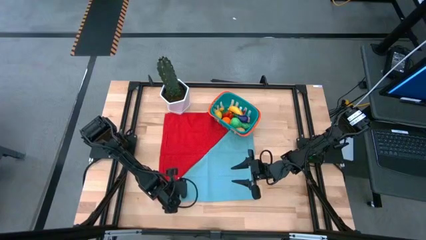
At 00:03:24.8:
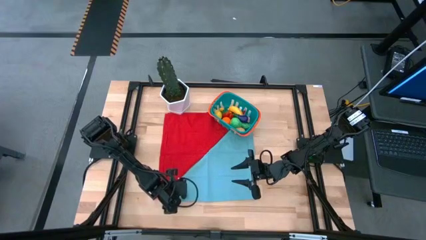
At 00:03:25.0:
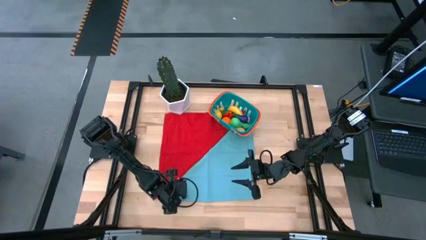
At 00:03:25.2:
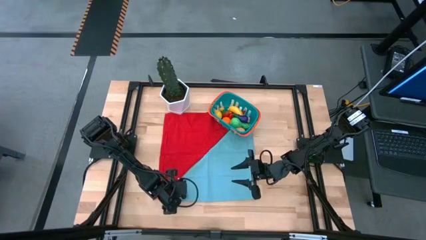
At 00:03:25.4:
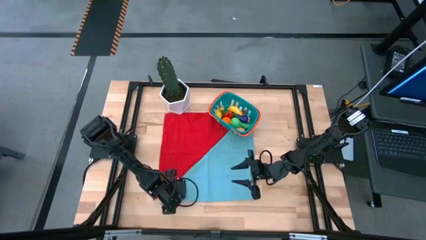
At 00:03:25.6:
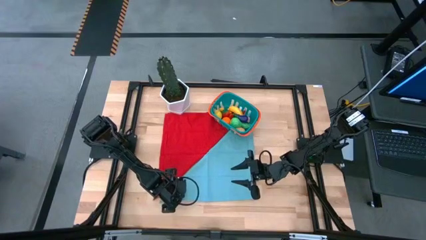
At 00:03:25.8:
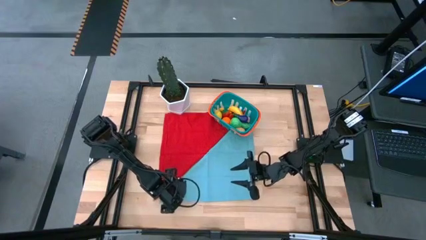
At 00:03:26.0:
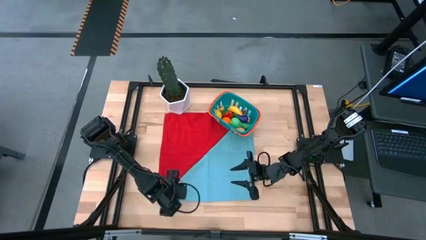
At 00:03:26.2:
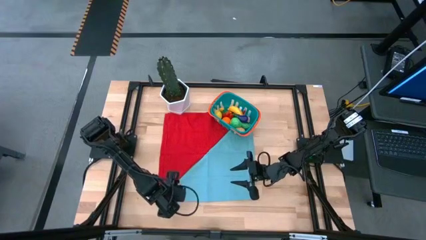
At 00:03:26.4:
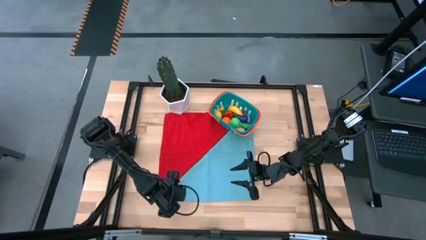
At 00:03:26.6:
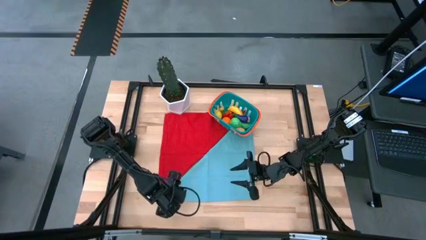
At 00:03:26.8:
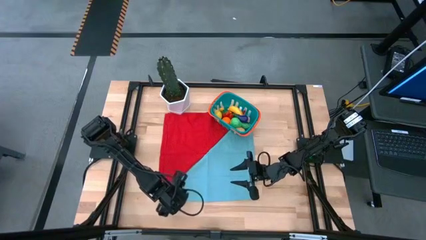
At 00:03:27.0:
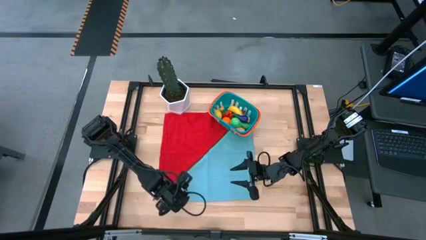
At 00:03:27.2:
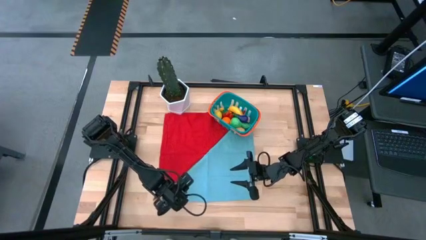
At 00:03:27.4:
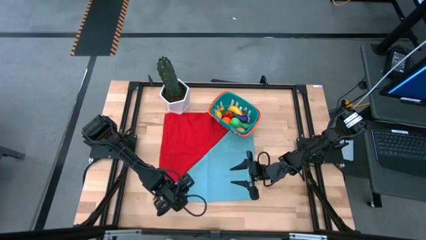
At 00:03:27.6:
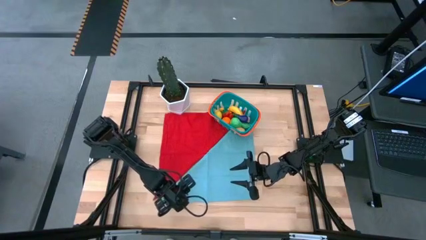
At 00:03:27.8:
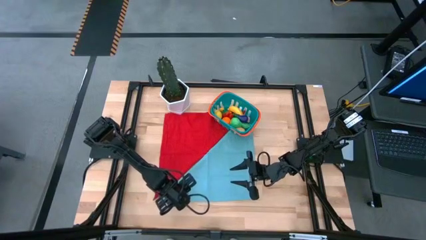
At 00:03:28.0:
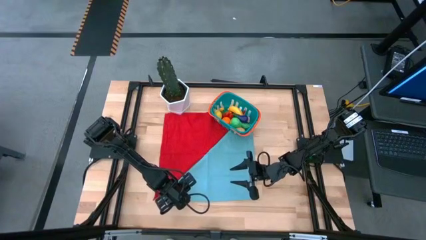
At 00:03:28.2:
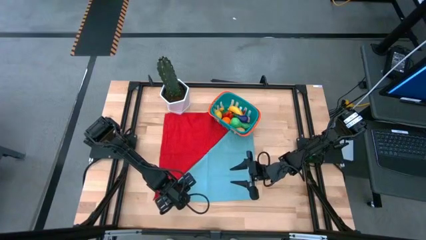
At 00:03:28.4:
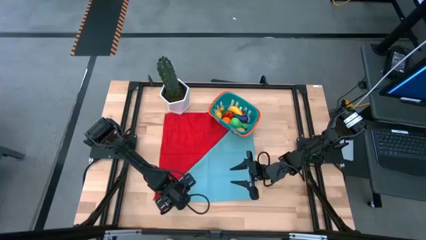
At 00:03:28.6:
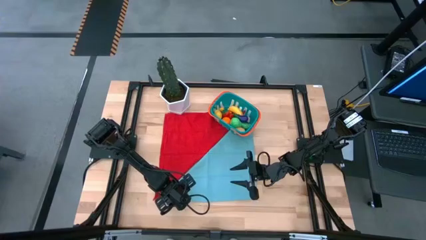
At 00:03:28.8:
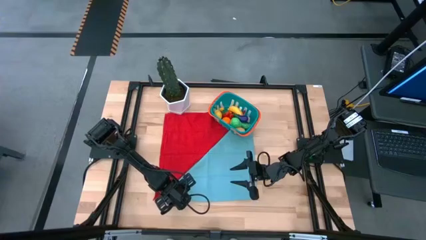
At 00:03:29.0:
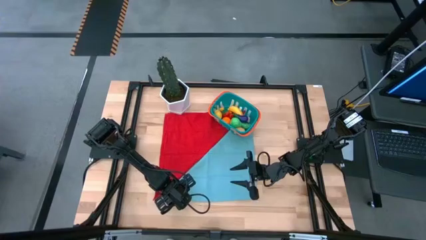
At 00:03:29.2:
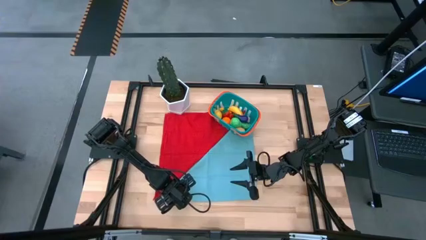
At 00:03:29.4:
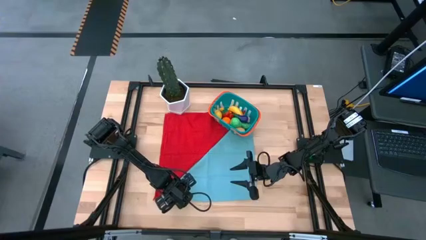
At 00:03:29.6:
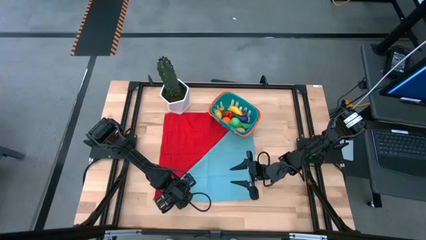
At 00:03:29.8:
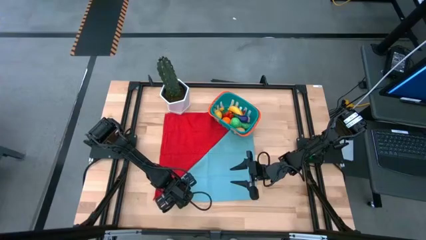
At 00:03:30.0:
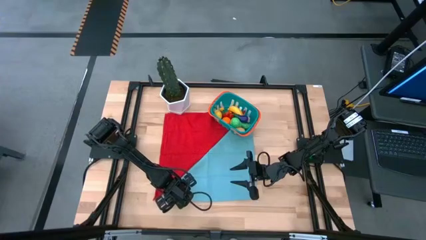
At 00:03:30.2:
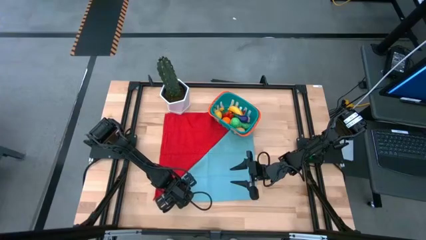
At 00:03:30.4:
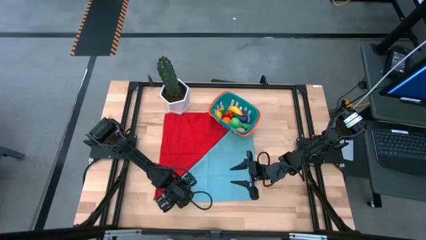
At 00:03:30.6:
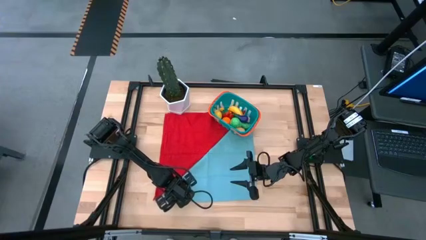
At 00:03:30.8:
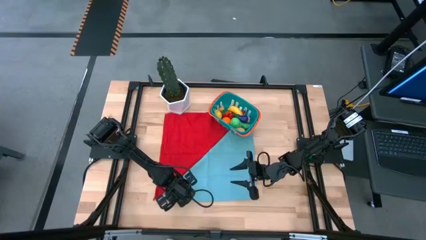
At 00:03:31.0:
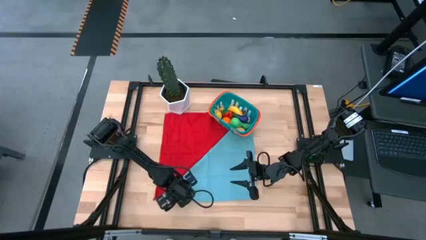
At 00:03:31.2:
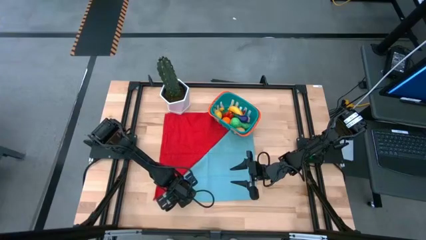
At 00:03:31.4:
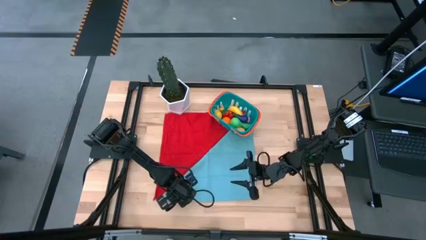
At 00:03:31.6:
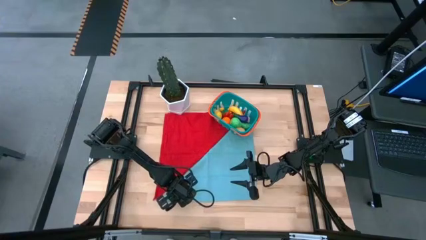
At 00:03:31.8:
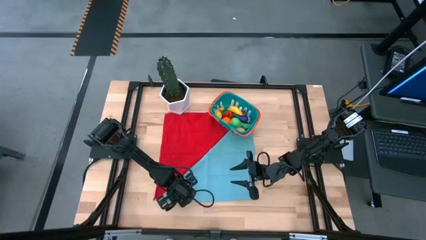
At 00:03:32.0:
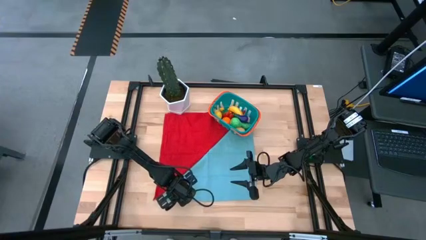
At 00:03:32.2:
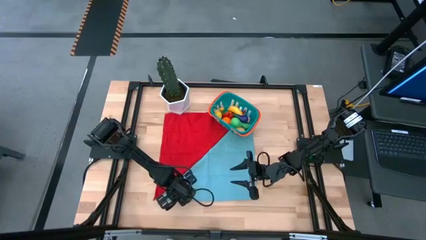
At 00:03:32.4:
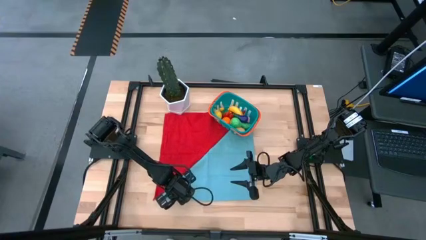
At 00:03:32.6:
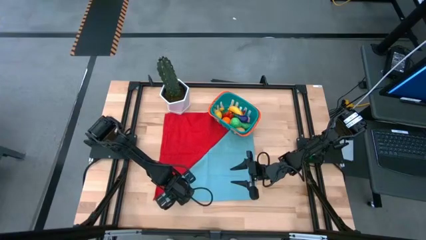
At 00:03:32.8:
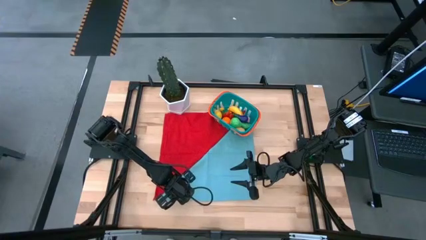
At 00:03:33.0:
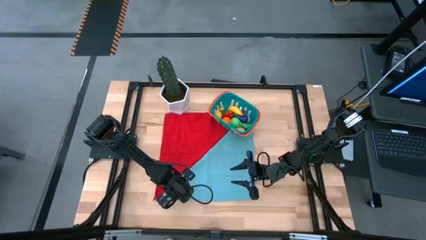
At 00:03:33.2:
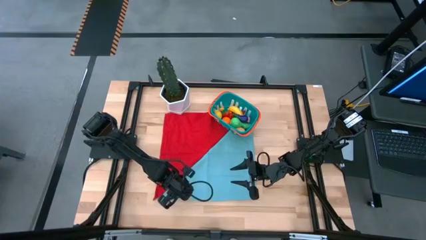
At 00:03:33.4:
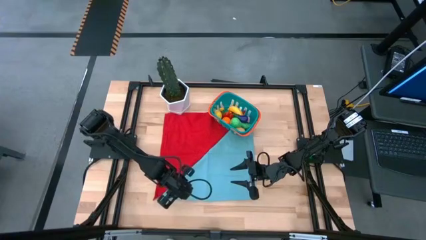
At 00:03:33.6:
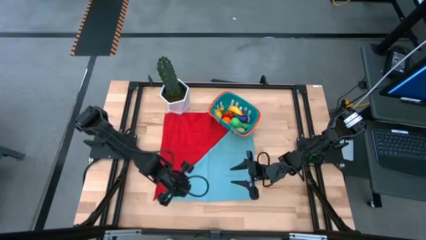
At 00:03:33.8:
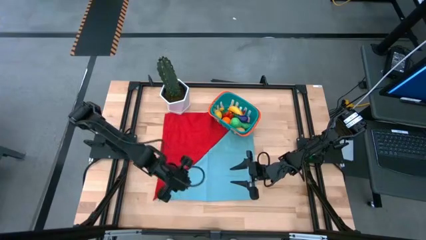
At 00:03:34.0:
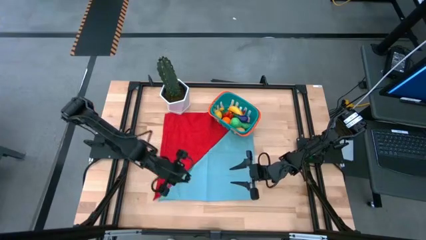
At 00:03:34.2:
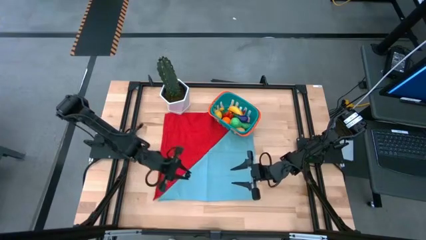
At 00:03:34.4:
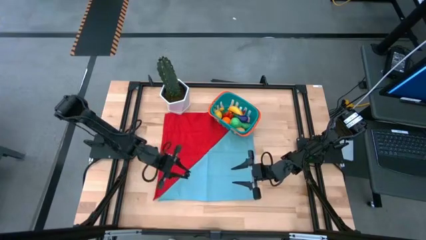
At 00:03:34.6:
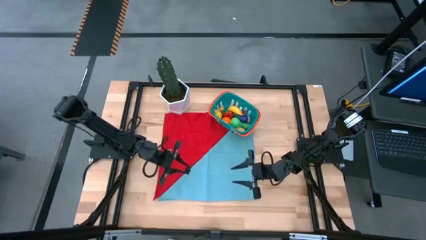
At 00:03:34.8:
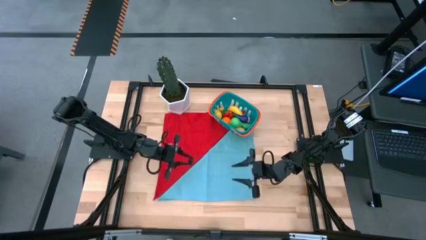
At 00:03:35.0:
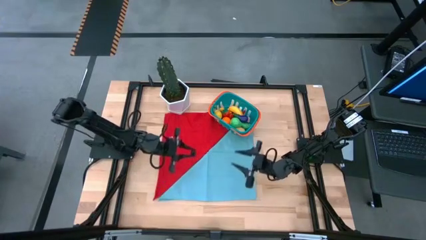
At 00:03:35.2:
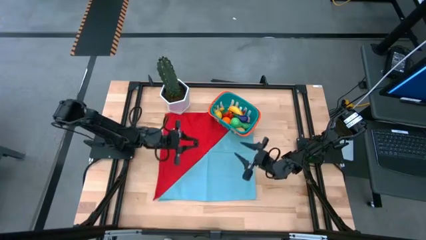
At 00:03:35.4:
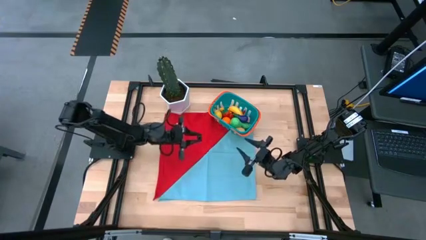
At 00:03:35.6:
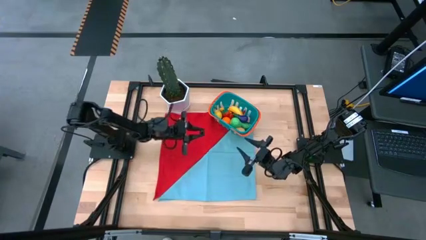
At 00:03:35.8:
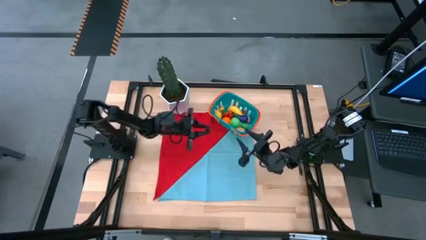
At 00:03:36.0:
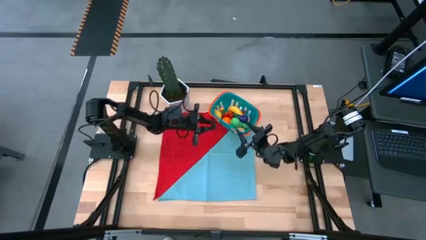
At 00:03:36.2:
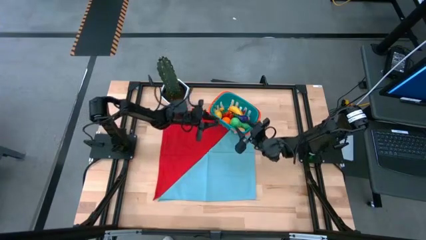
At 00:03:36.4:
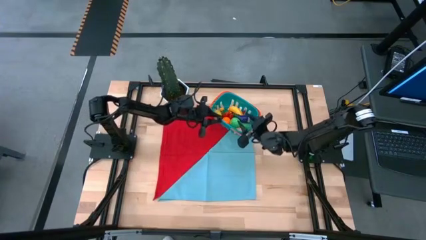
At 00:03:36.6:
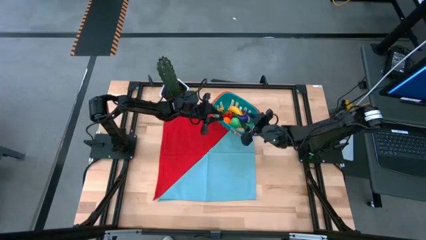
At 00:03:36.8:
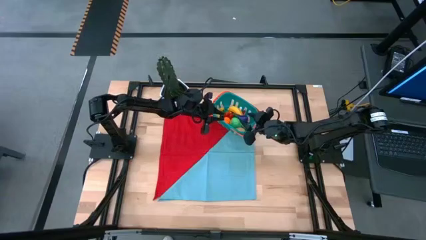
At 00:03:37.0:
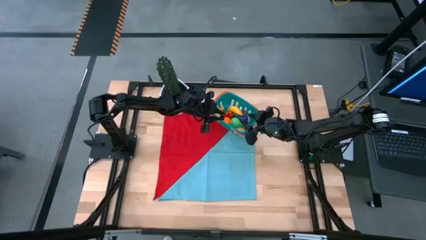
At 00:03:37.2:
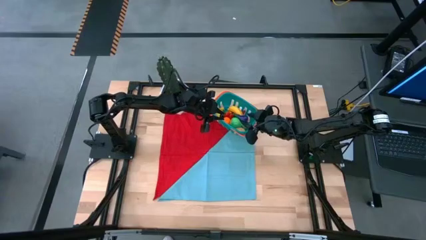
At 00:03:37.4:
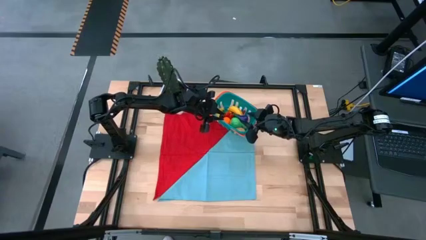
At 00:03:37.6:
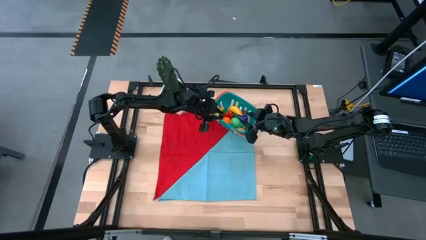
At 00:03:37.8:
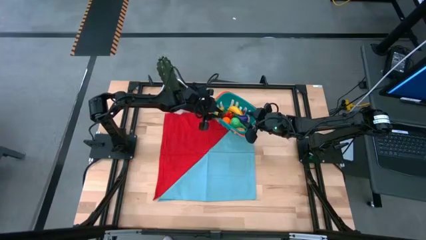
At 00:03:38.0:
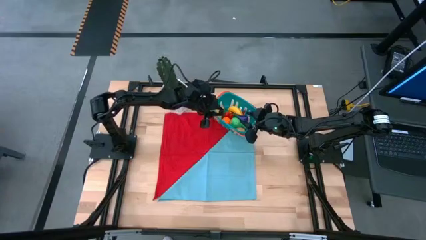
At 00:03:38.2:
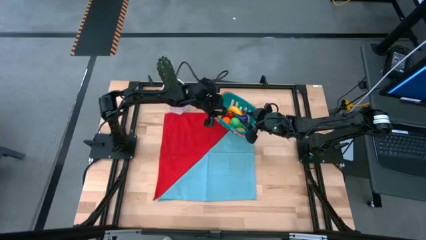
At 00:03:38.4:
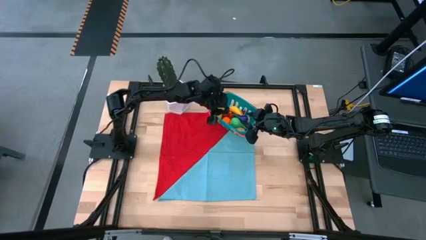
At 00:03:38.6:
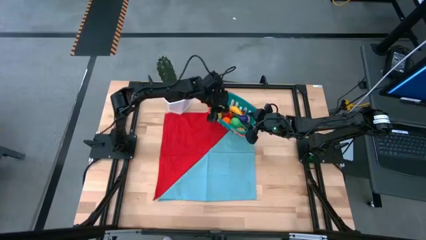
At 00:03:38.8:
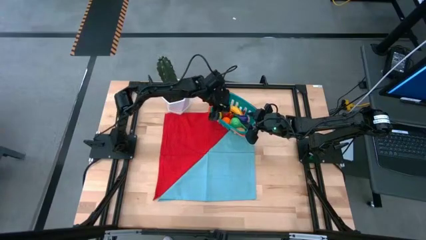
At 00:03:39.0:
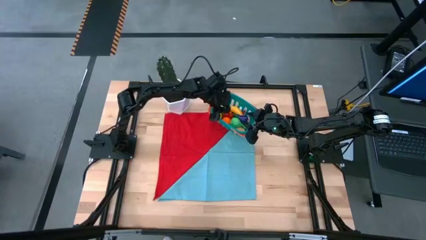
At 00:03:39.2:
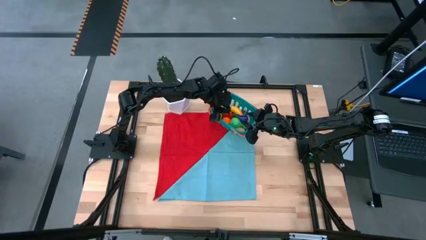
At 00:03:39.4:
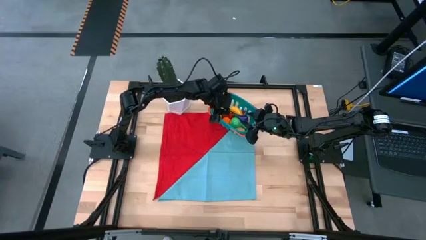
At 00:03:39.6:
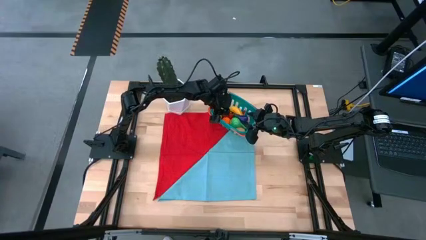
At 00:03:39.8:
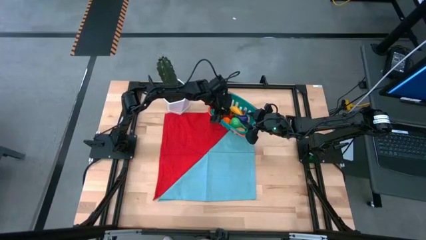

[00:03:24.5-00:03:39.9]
Task: Pick and placing Produce into tupperware
Put the blackberry into the blue basket
